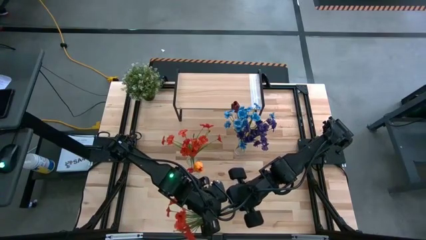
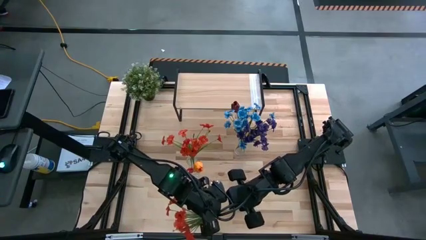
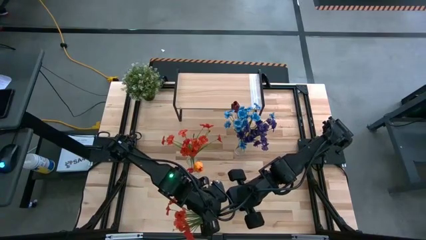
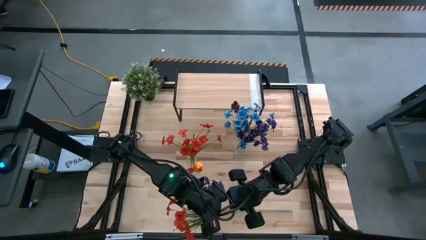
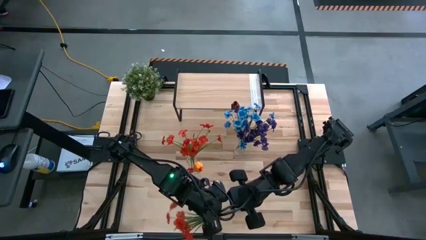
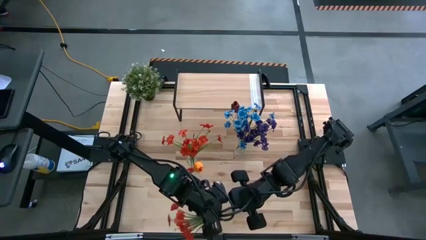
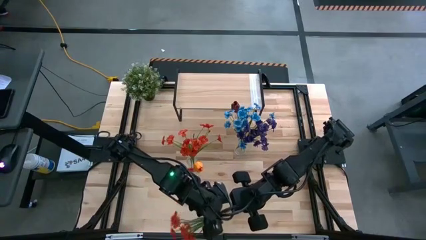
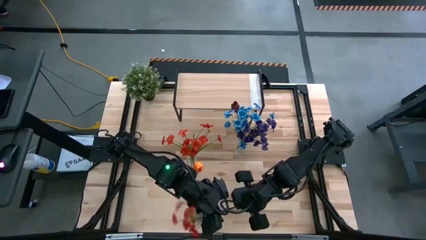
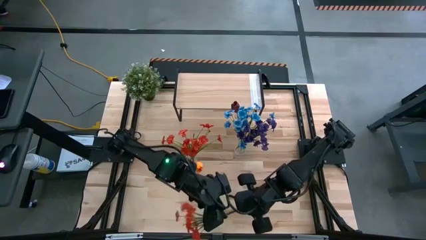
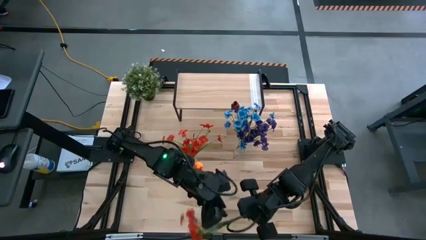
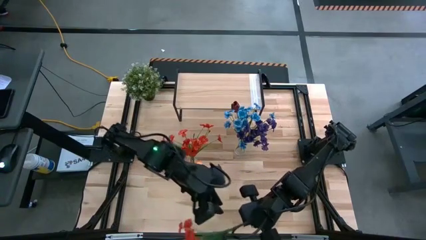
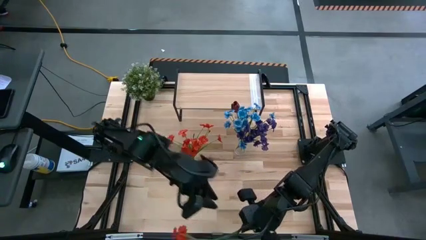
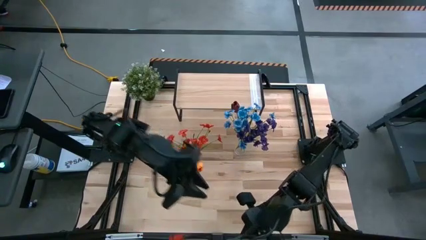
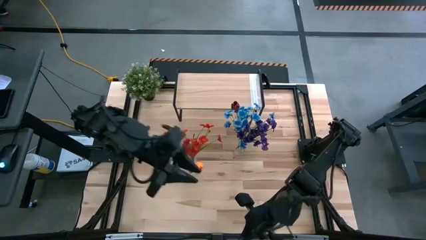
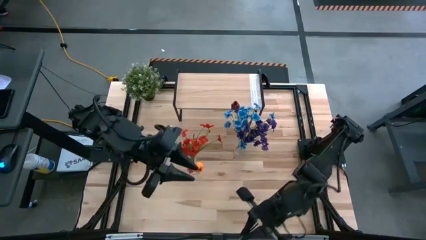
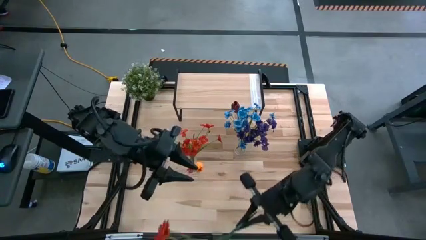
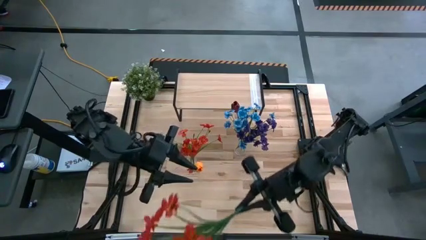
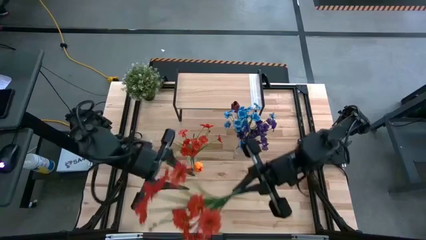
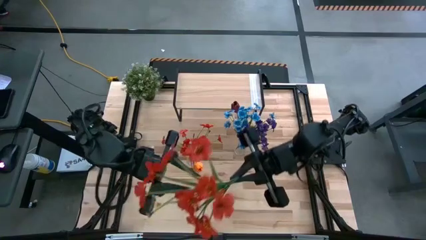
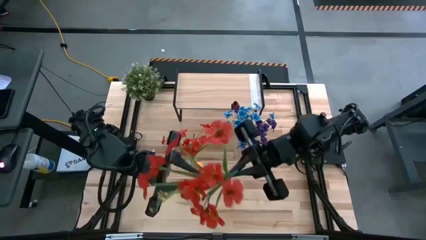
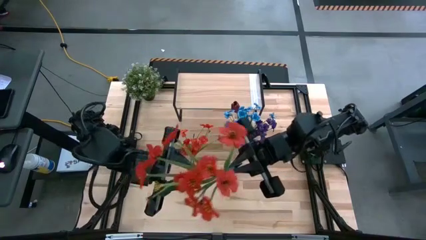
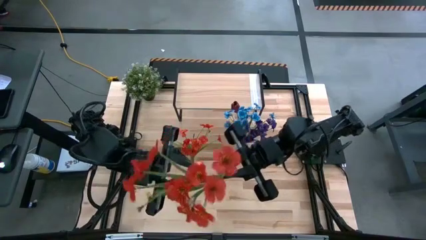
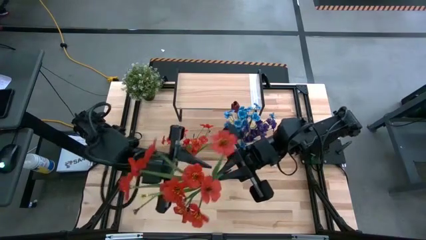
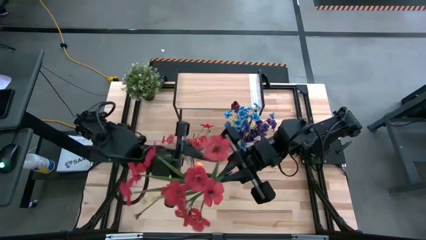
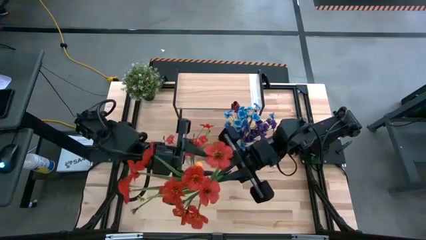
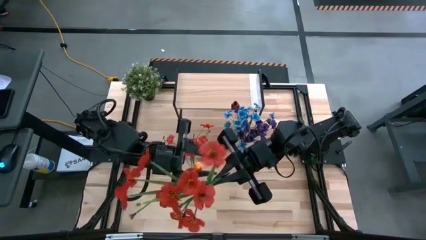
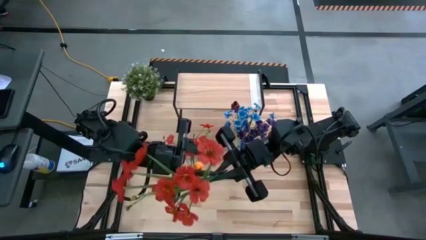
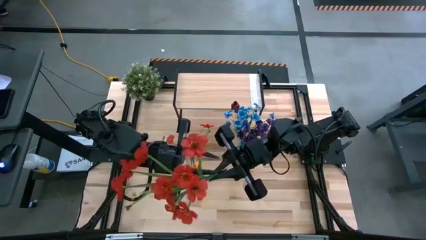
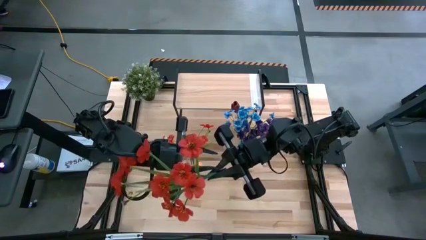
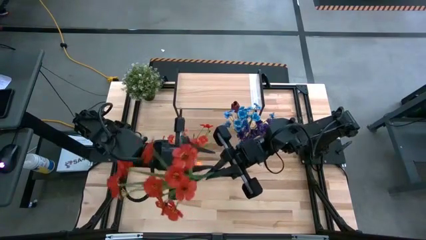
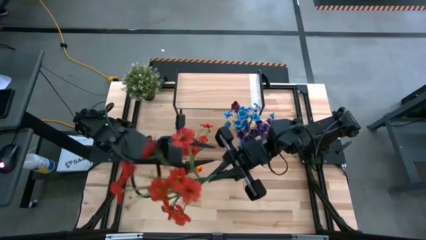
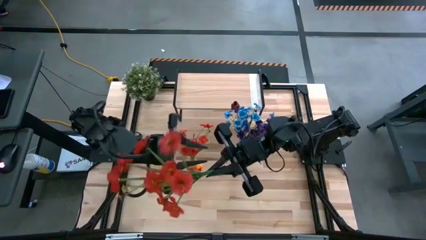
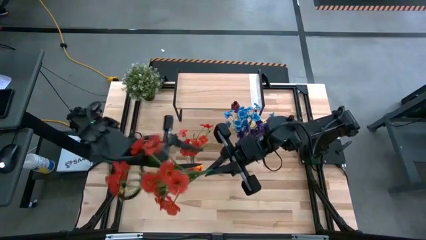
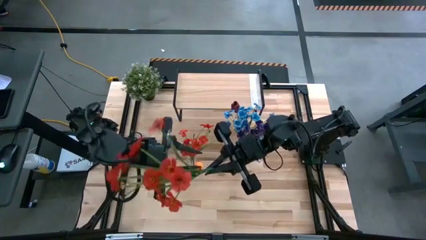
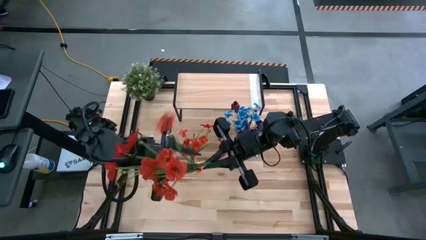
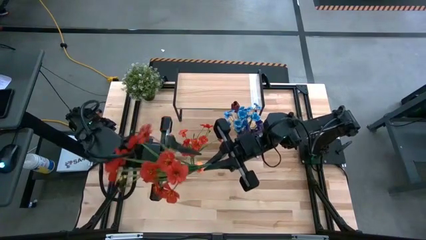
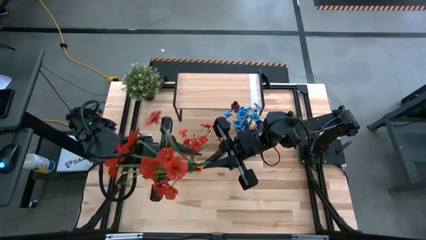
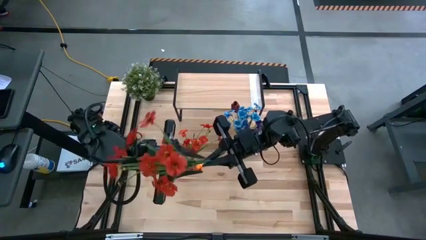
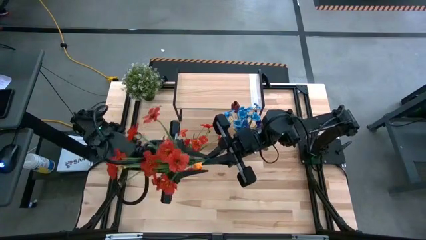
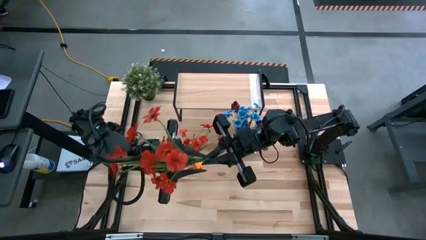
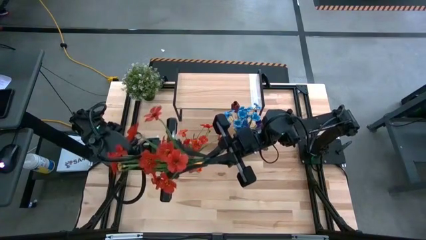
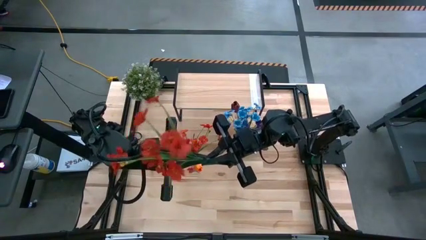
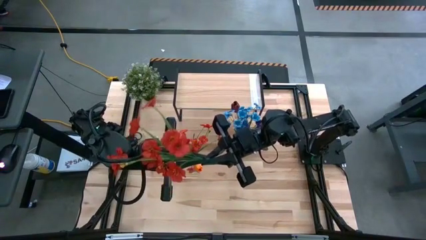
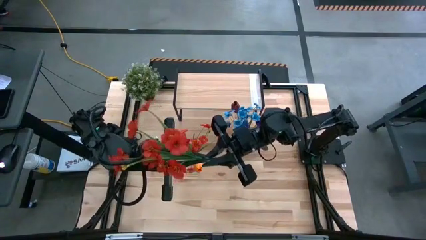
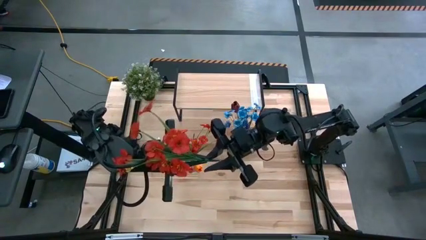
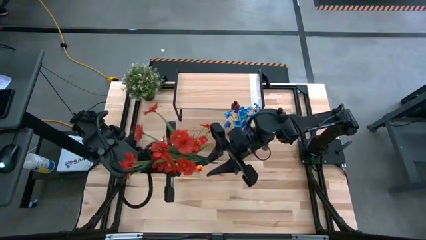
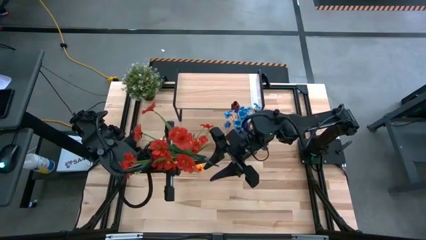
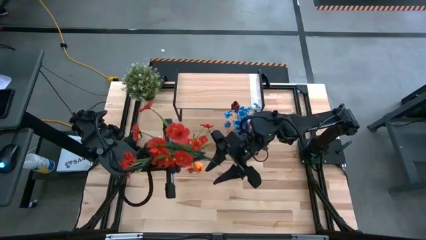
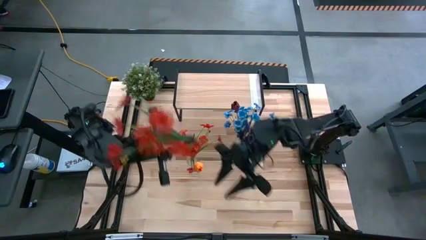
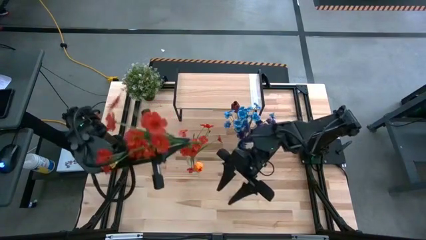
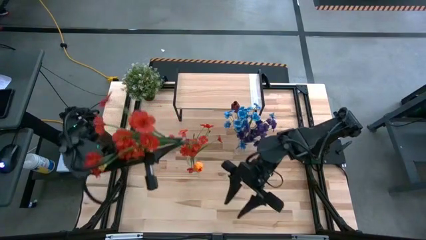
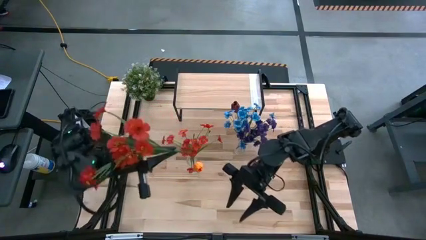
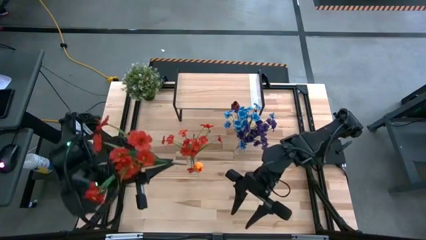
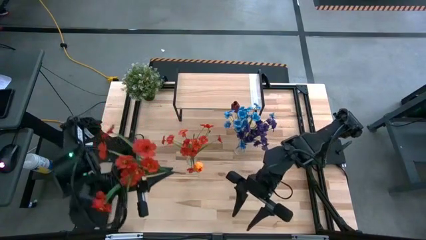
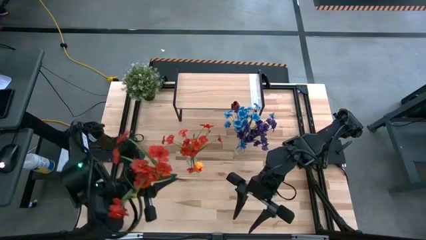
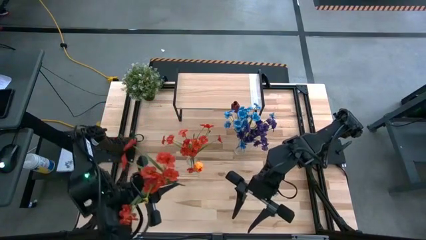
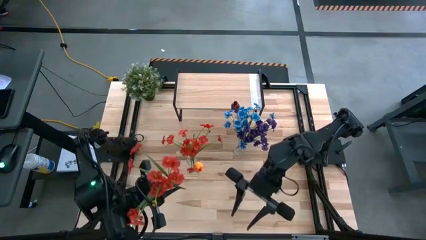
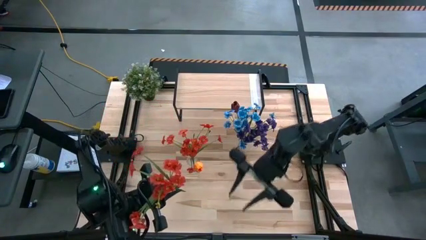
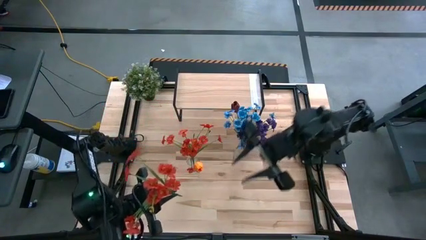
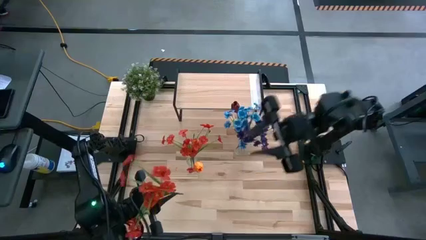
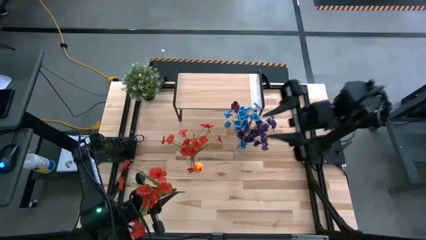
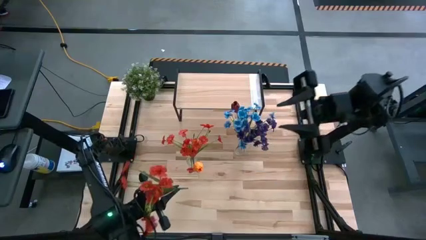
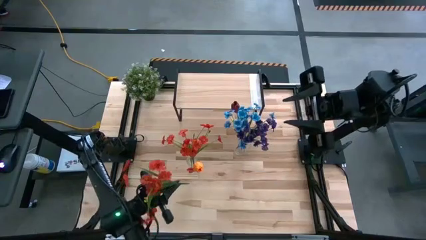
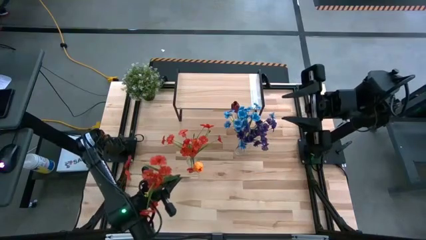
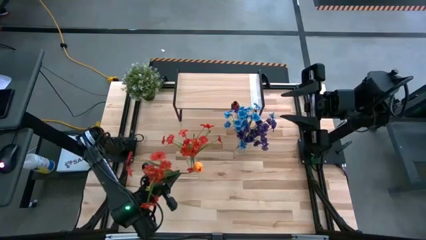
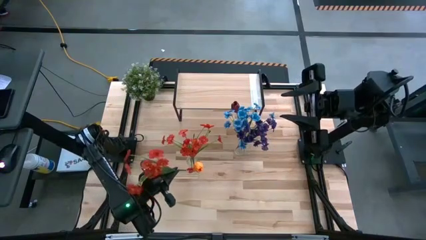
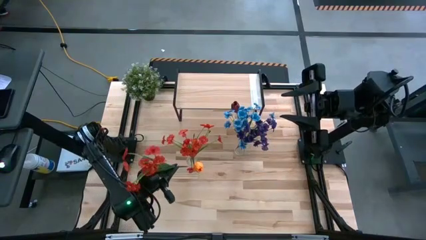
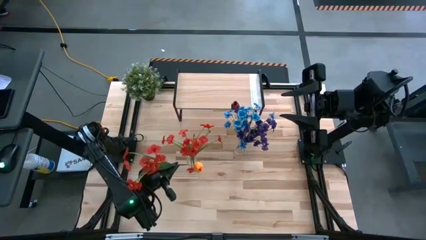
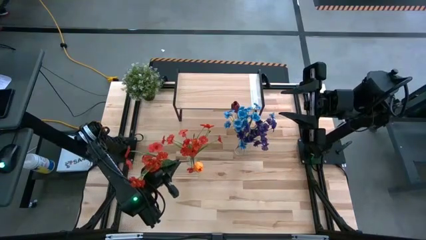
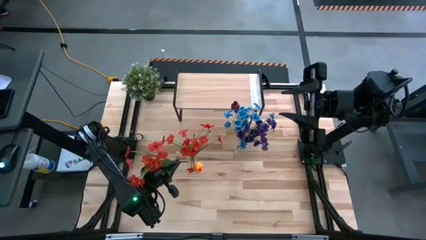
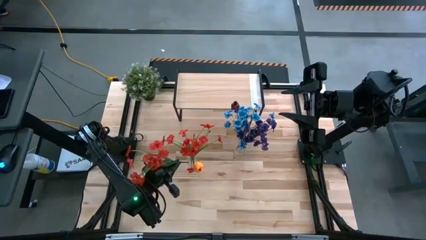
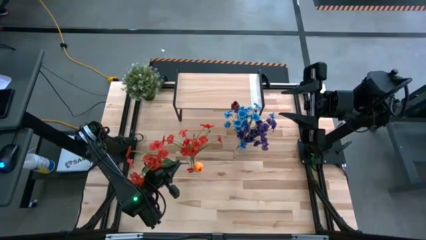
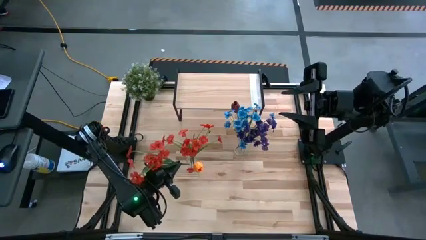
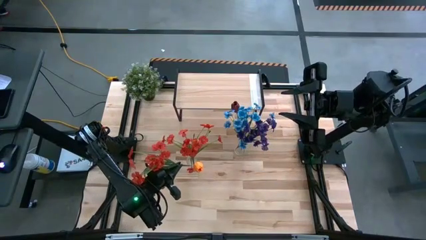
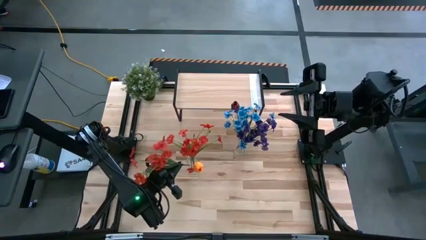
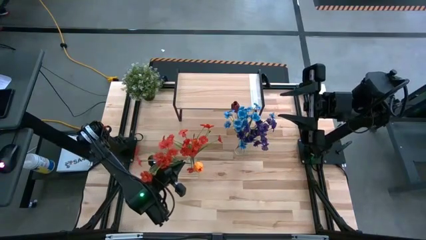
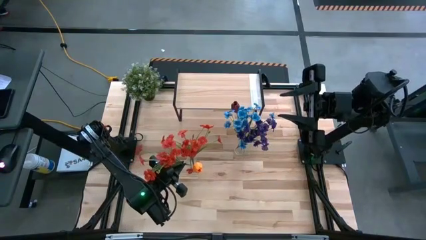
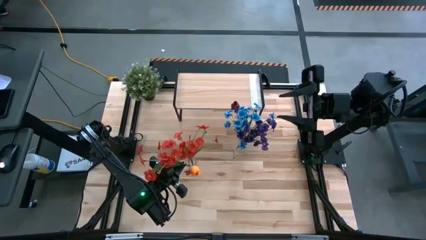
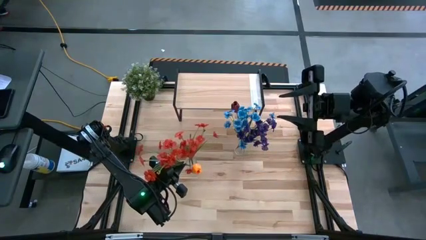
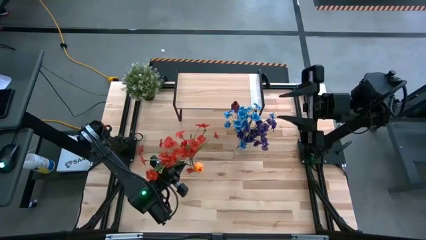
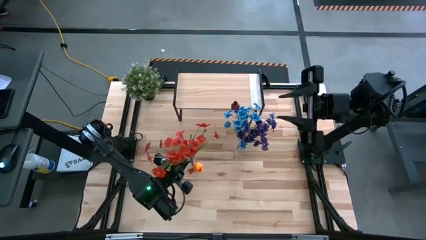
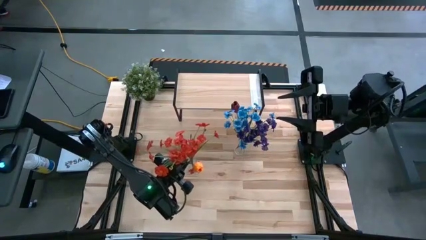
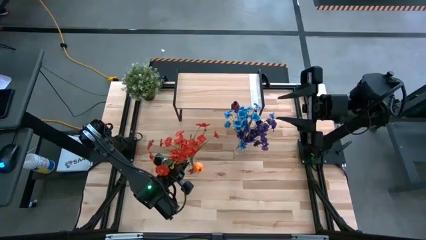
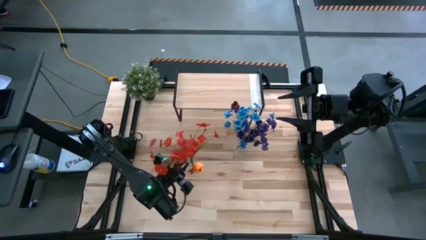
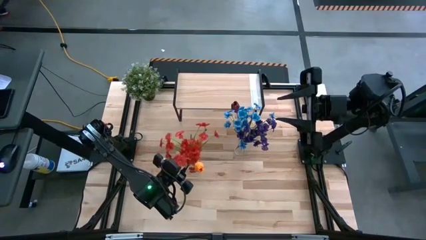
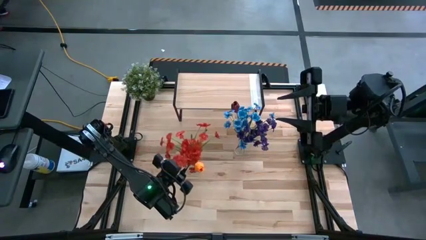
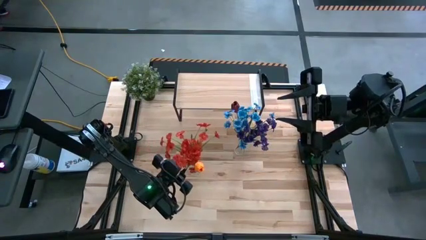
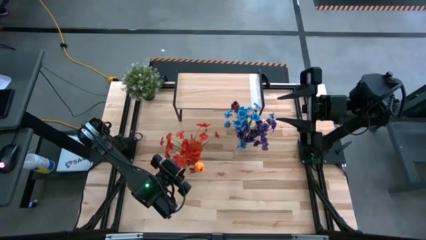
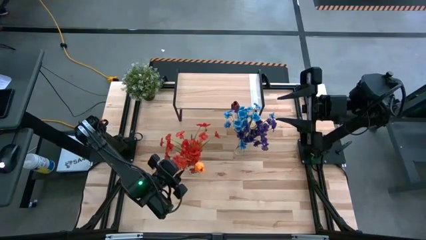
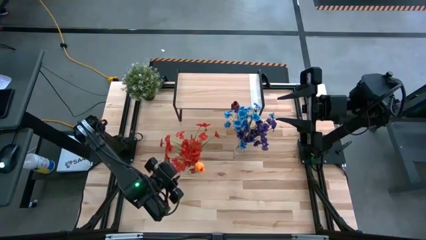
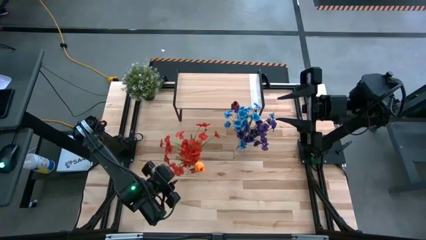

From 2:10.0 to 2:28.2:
Task: Pick and place flowers into a vace then onto a shelf
Put the red flower into the left transparent vase
